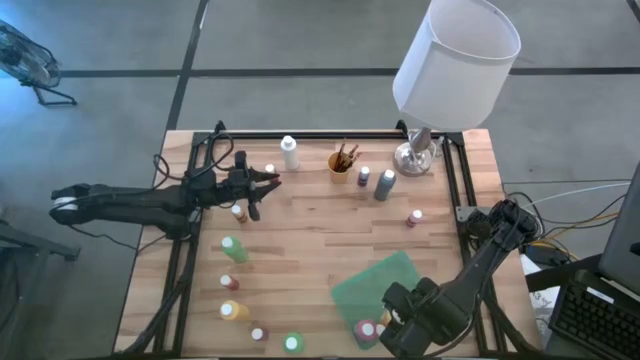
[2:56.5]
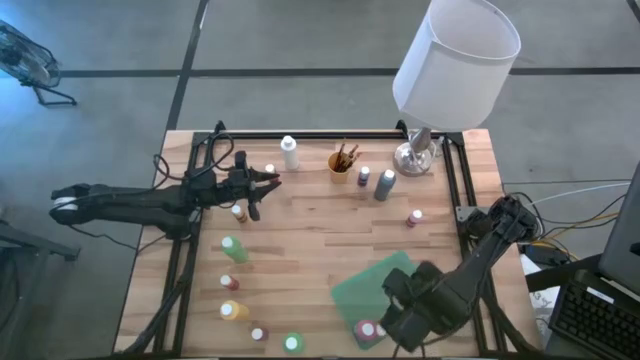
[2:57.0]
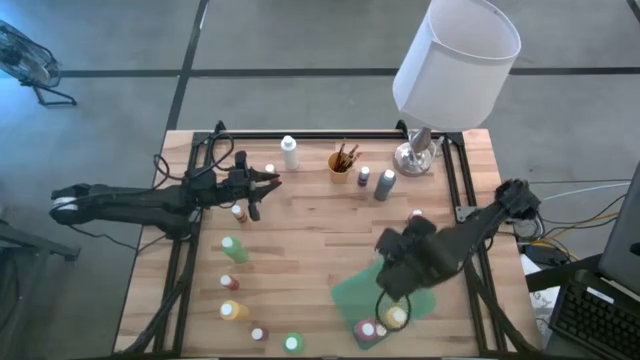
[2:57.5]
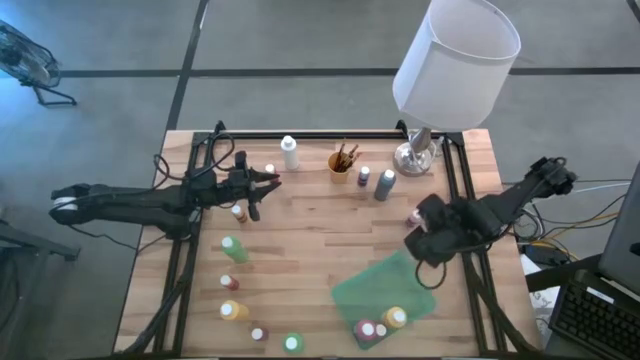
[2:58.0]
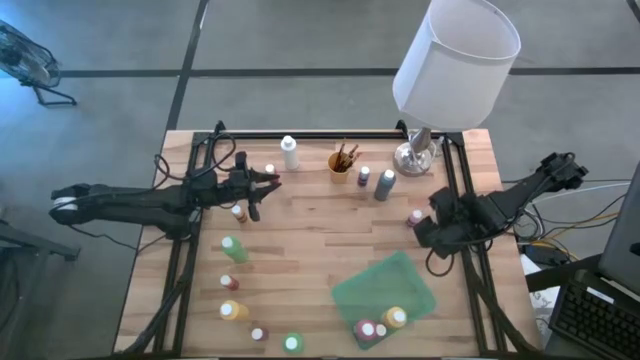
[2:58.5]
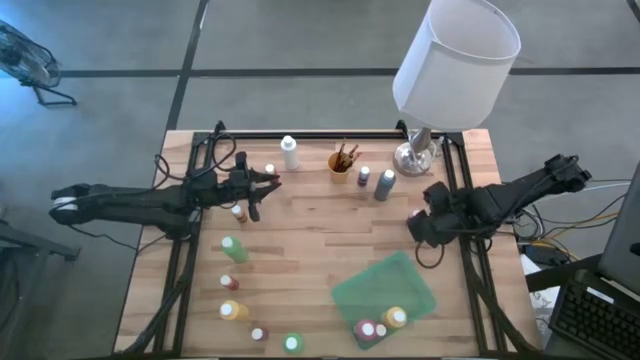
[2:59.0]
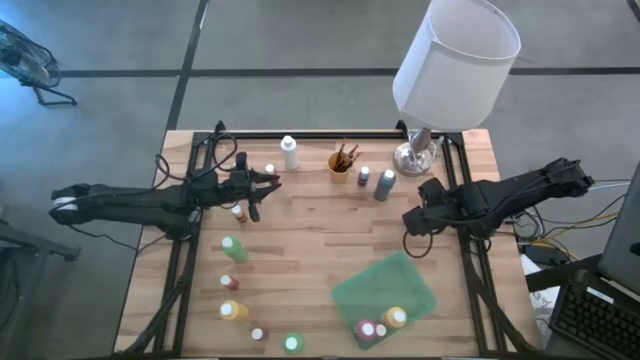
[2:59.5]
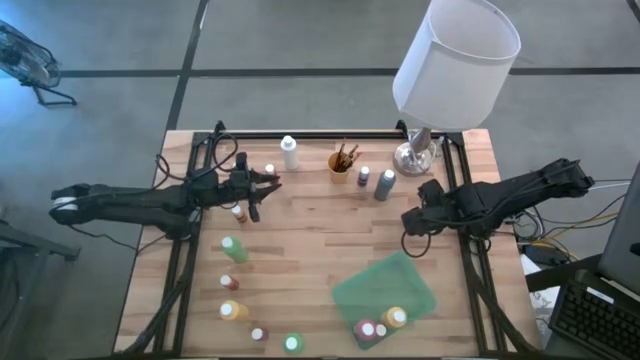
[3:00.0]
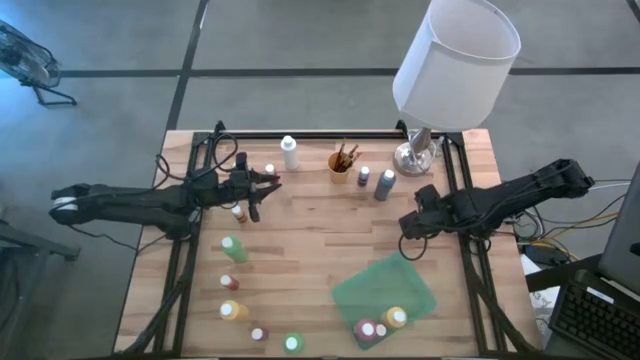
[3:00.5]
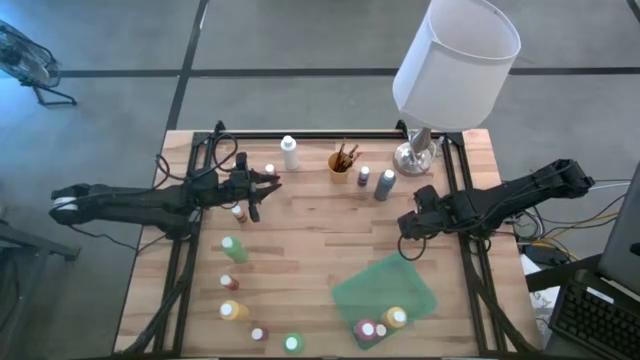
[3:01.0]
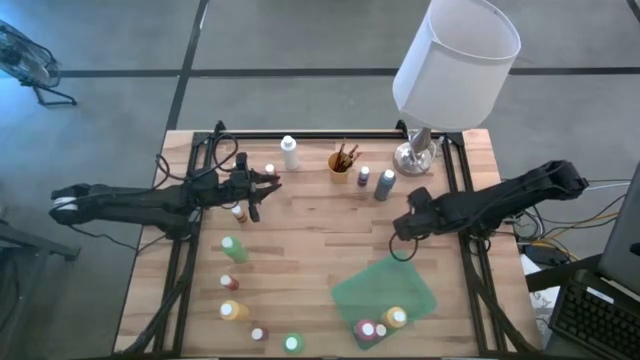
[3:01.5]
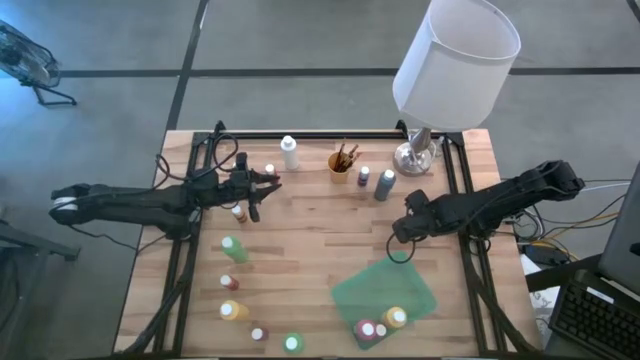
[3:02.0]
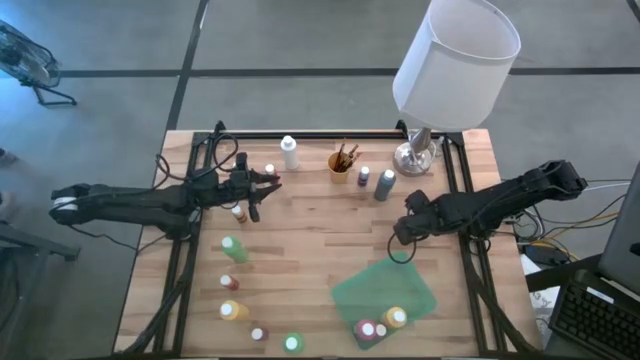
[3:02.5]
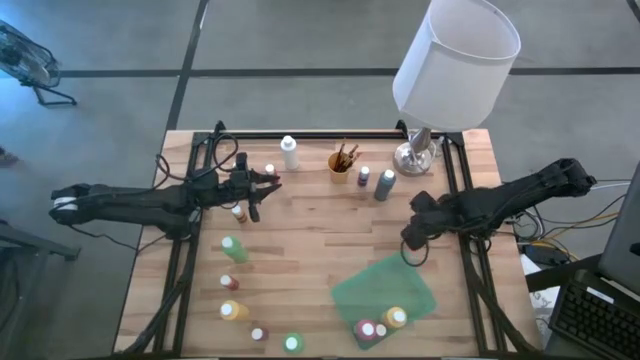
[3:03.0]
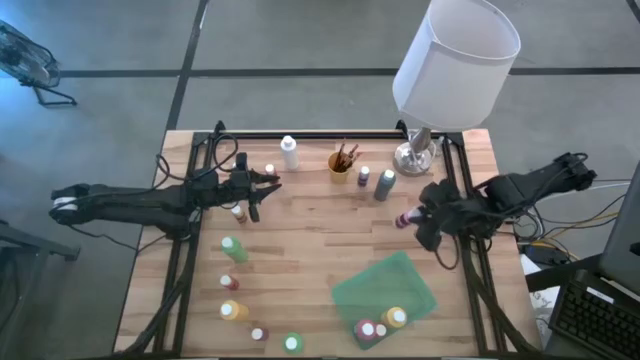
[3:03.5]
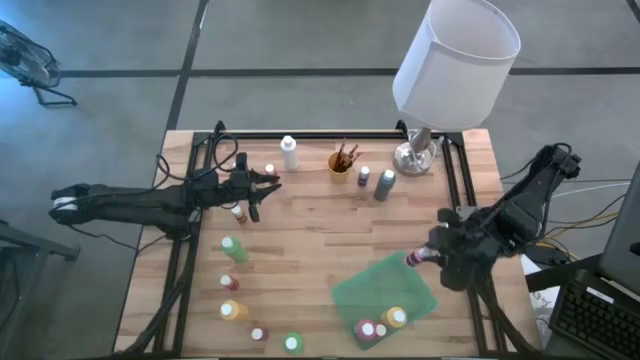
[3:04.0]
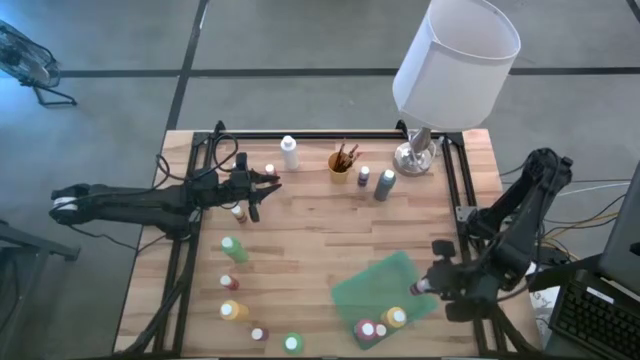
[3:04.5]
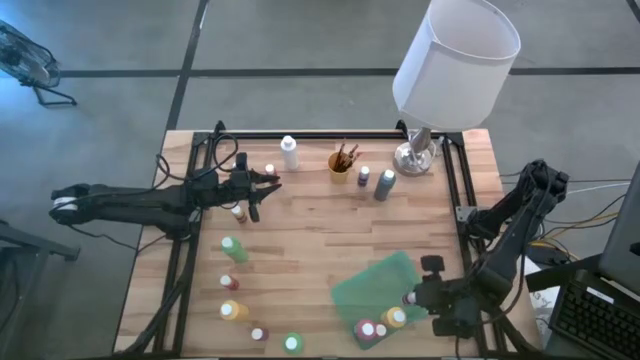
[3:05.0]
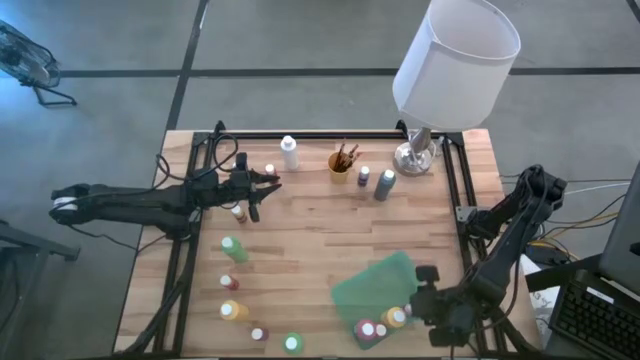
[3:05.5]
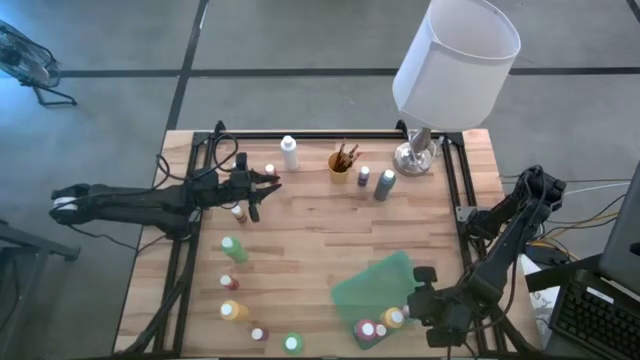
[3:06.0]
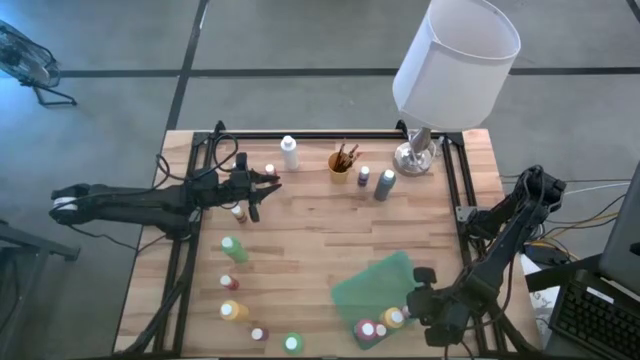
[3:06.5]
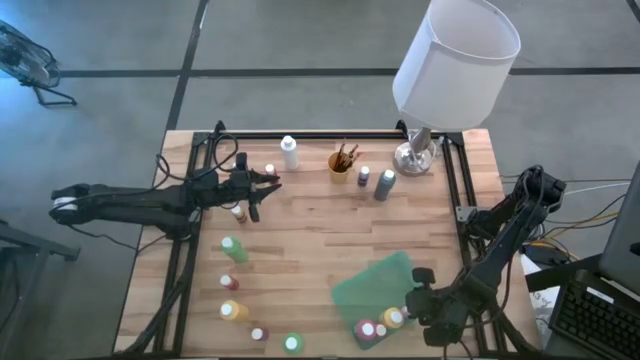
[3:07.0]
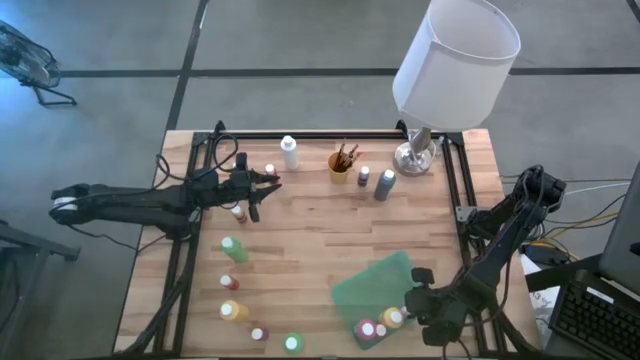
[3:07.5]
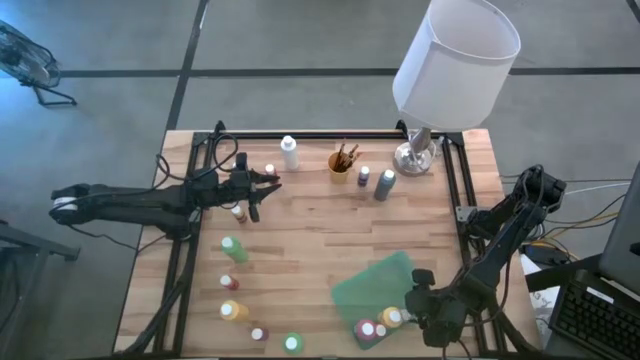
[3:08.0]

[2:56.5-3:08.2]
Task: Pick & Place Paint Supplies
Put the pink paint bottle into the green bin

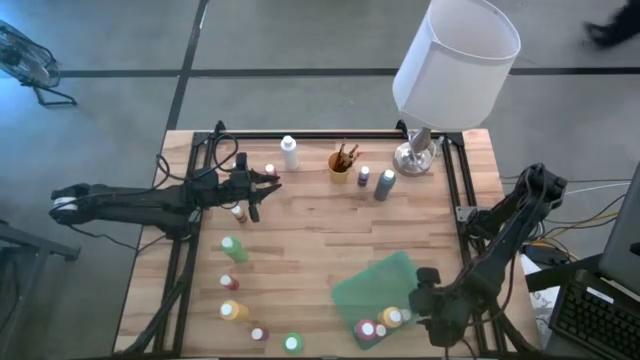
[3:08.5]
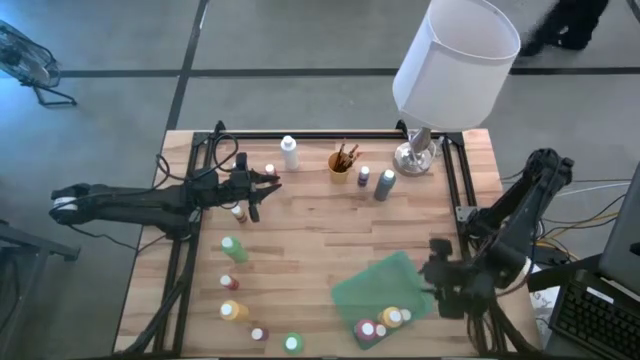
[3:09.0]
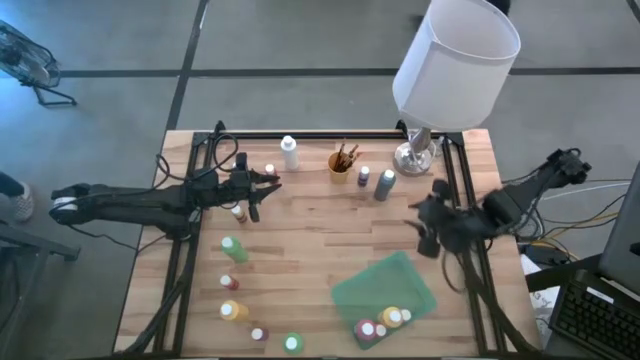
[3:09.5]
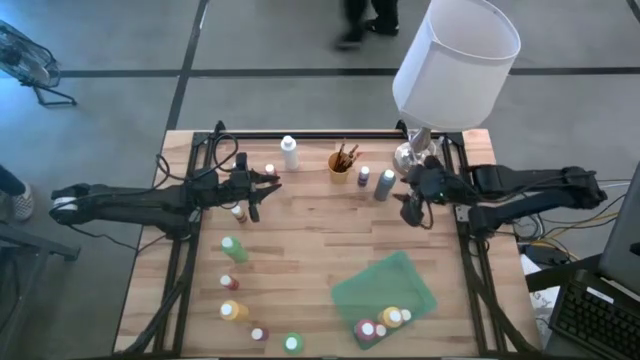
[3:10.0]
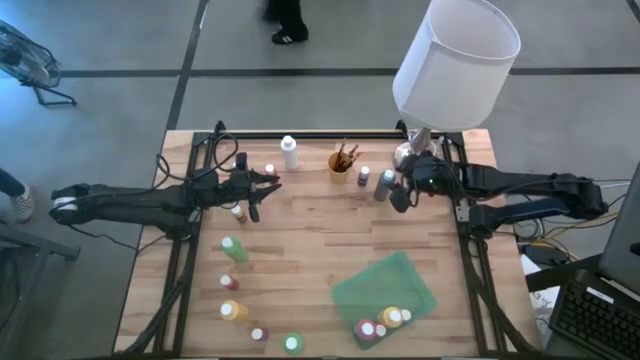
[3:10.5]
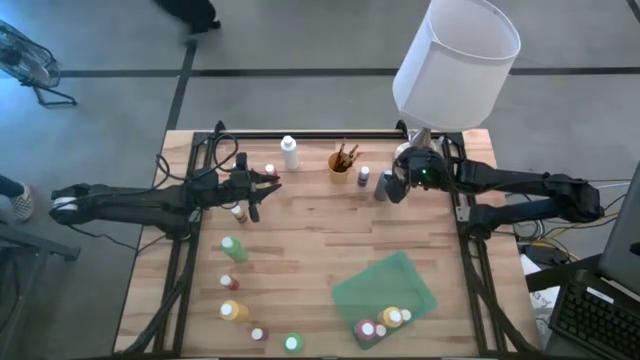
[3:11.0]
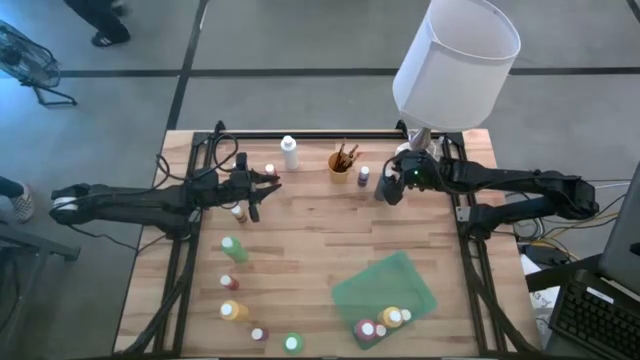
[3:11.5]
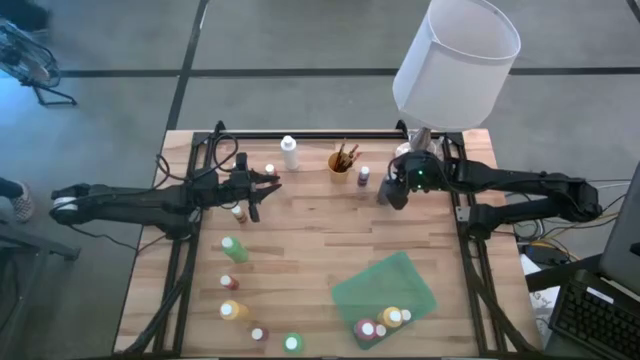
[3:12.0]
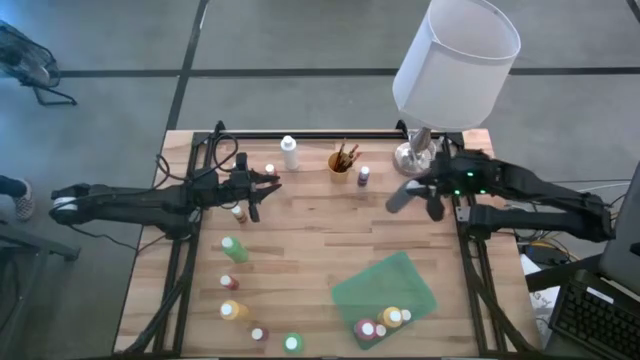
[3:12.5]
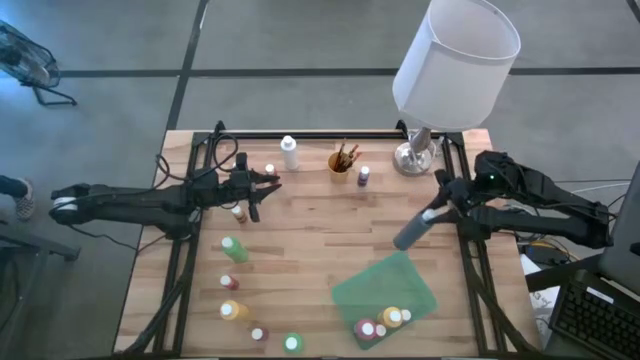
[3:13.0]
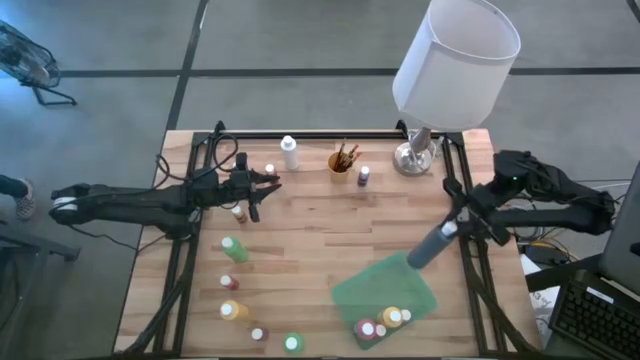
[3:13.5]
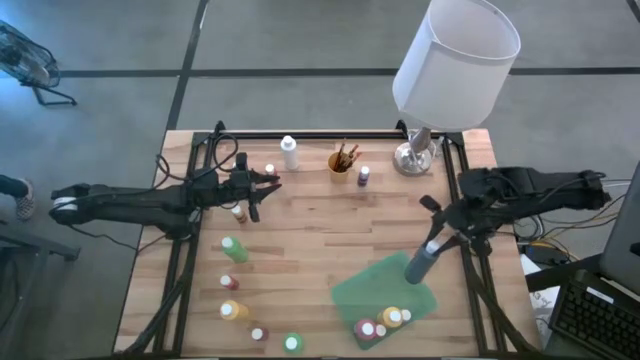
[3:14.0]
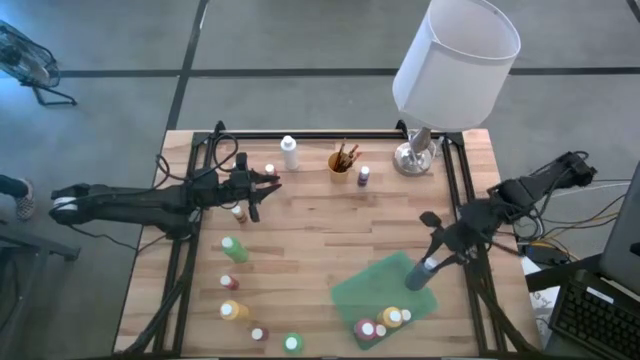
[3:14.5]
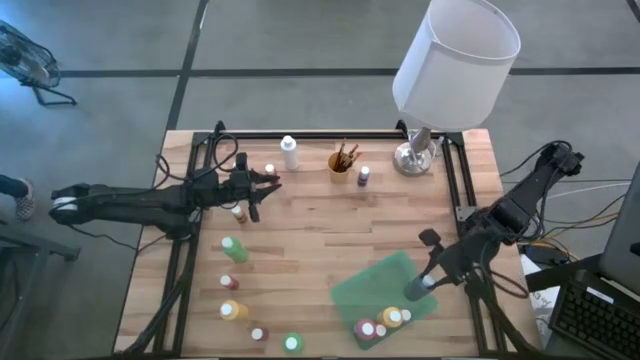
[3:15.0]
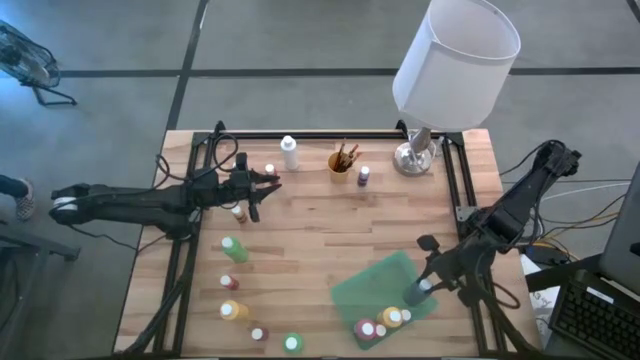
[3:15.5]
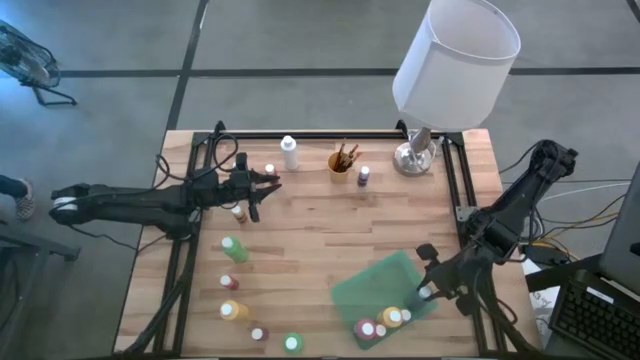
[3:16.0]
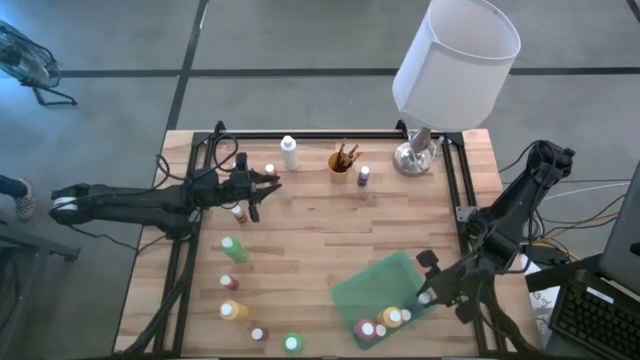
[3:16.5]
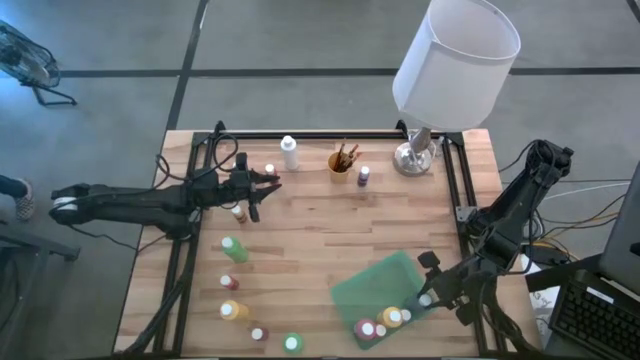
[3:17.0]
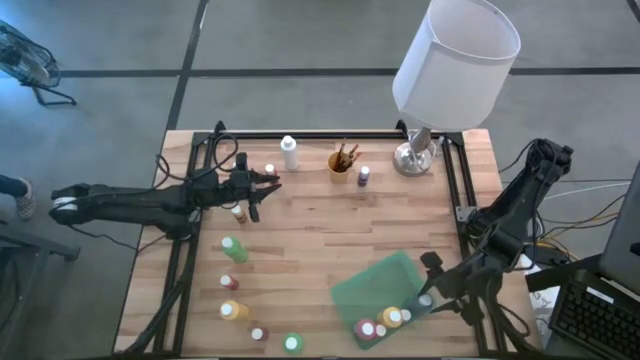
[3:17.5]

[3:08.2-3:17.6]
Put the big blue paint bottle into the green bin
